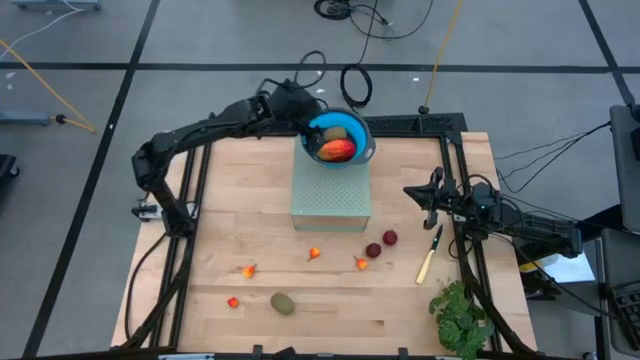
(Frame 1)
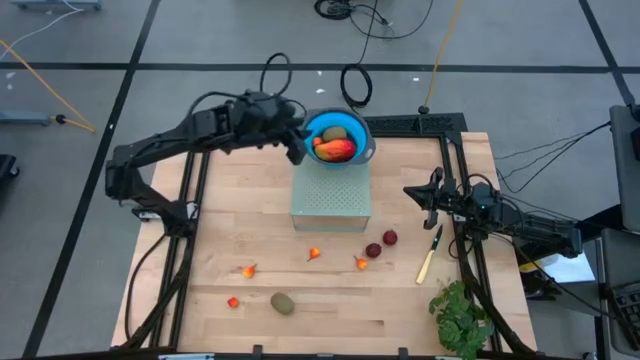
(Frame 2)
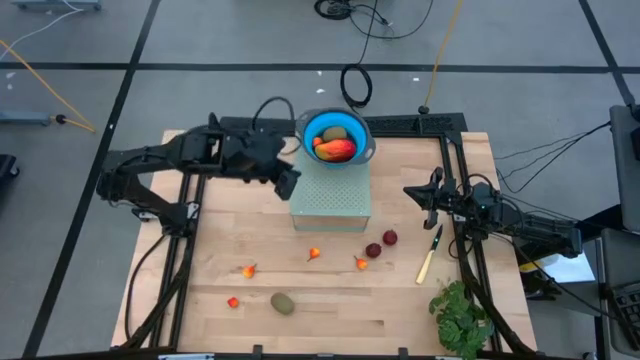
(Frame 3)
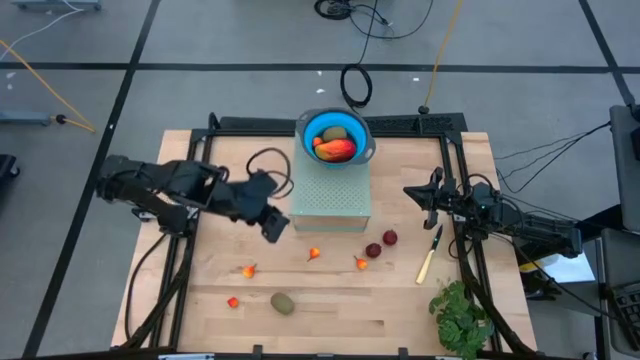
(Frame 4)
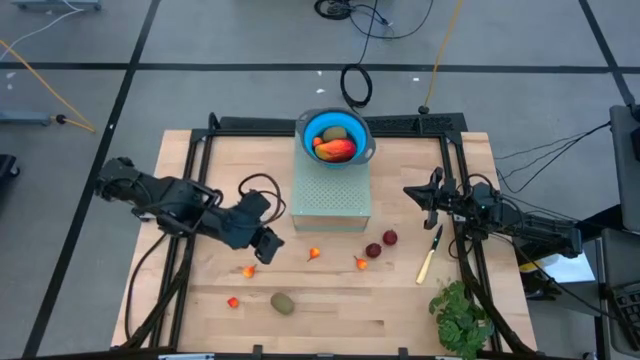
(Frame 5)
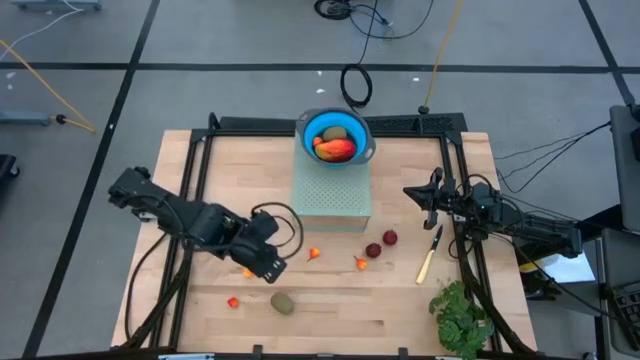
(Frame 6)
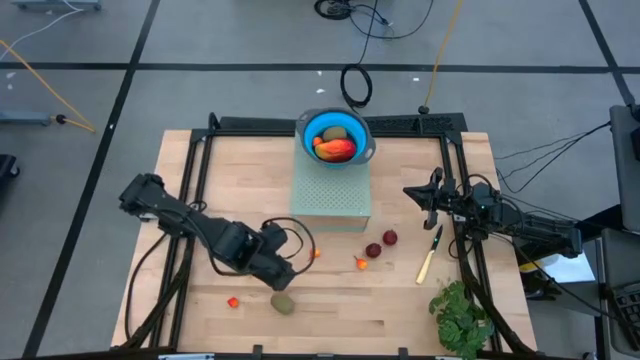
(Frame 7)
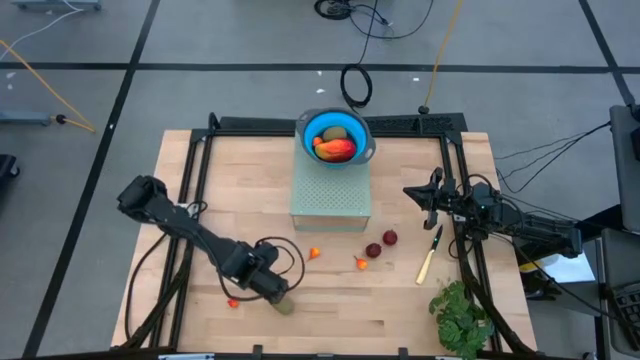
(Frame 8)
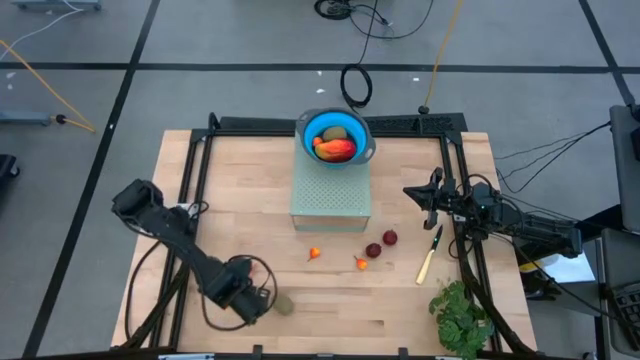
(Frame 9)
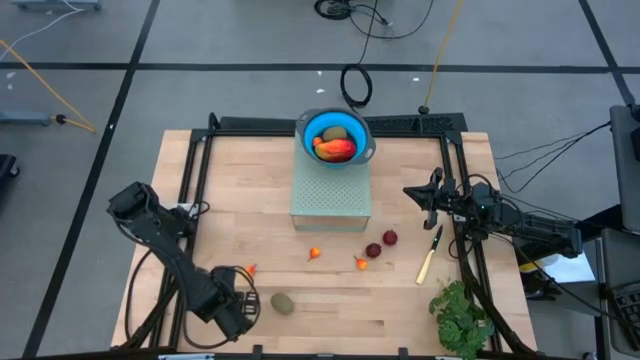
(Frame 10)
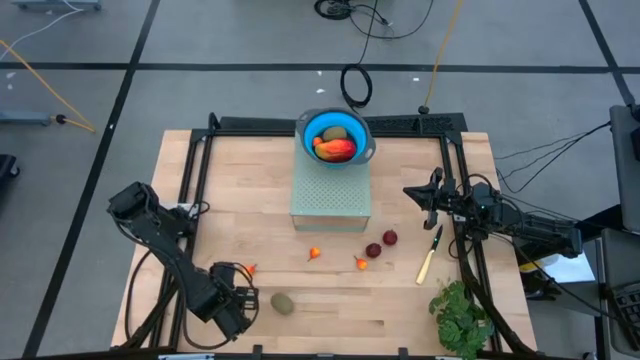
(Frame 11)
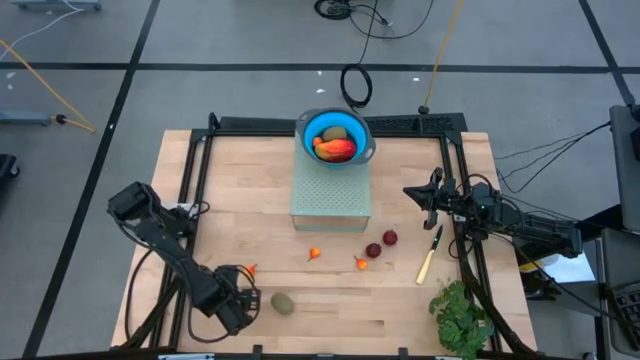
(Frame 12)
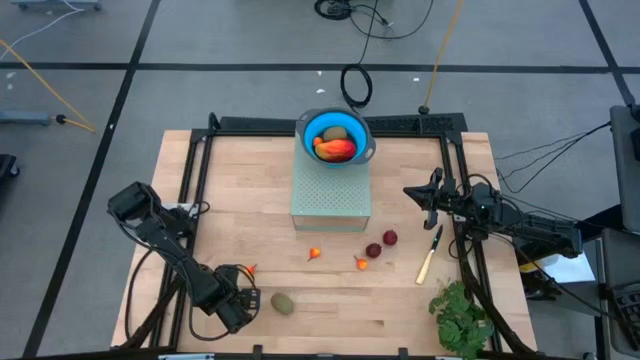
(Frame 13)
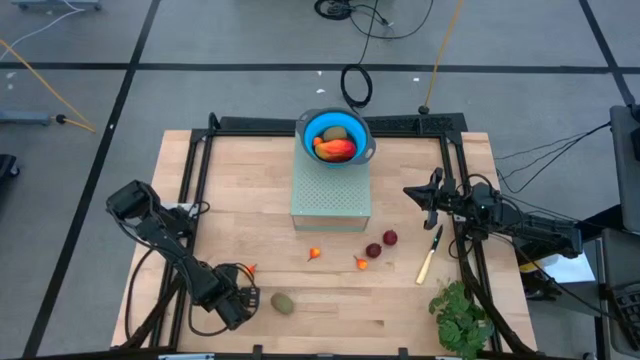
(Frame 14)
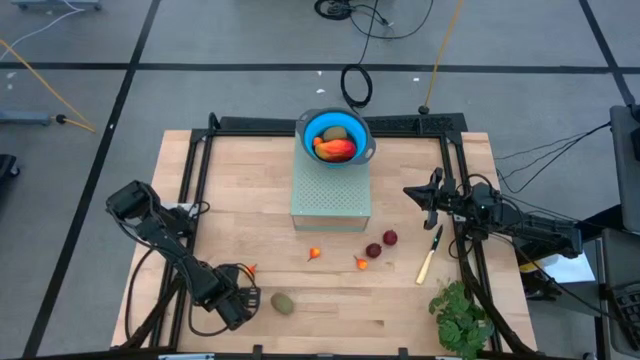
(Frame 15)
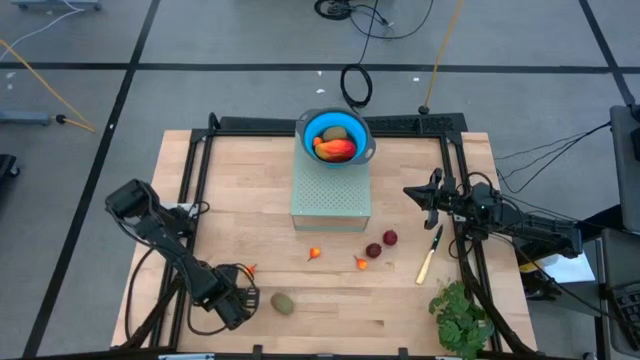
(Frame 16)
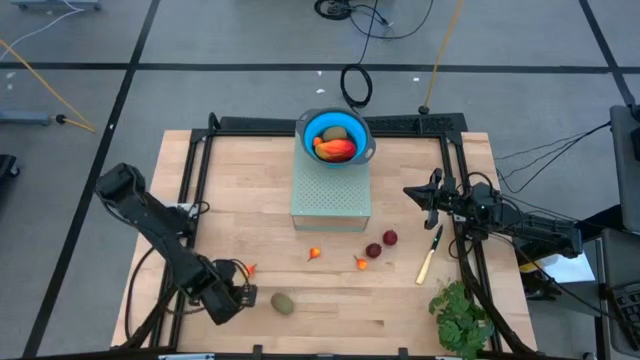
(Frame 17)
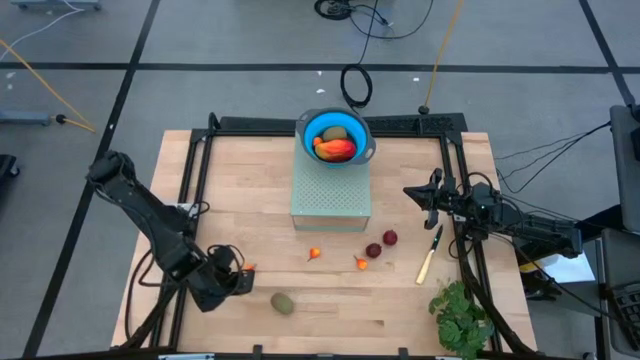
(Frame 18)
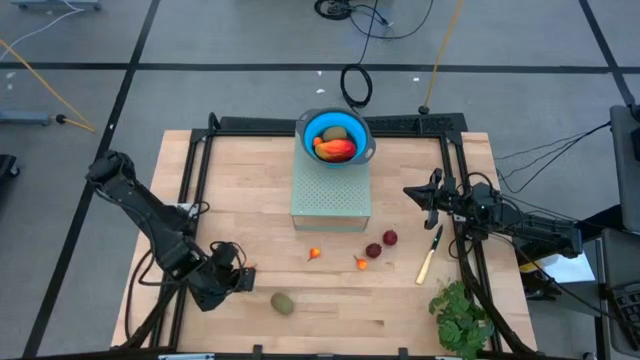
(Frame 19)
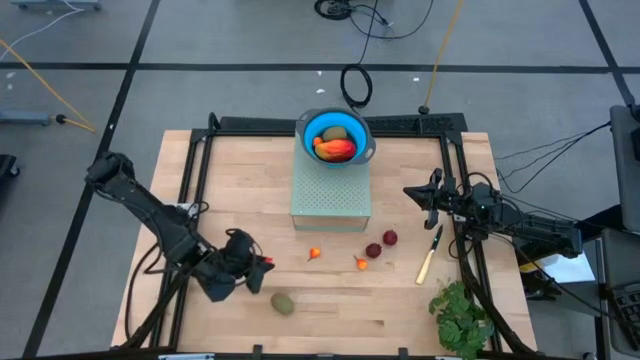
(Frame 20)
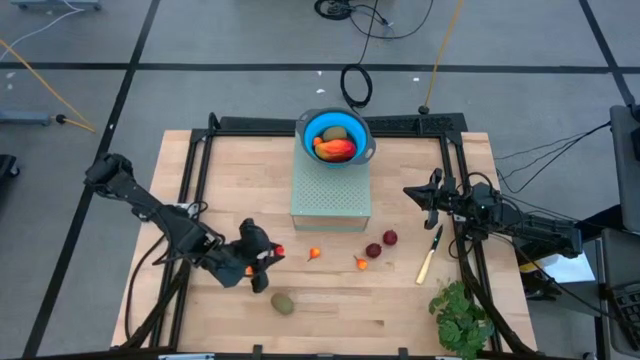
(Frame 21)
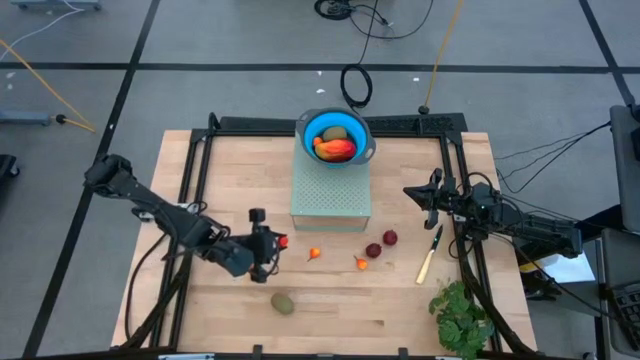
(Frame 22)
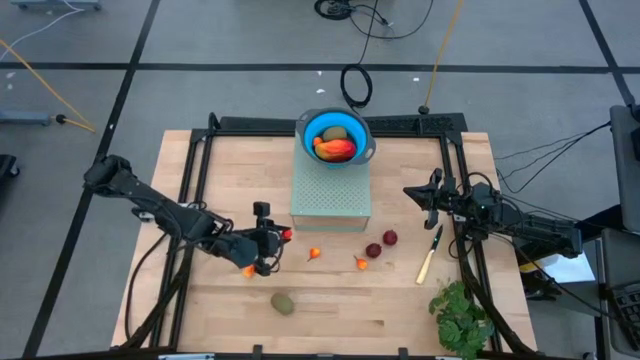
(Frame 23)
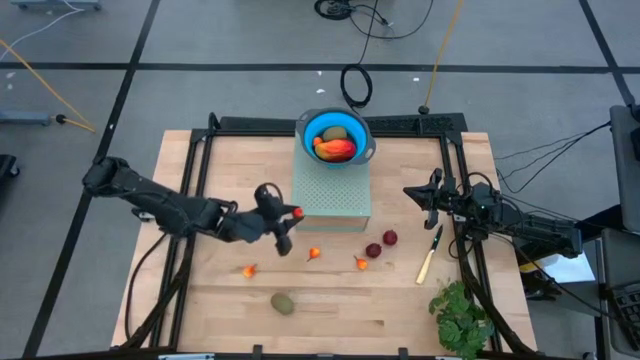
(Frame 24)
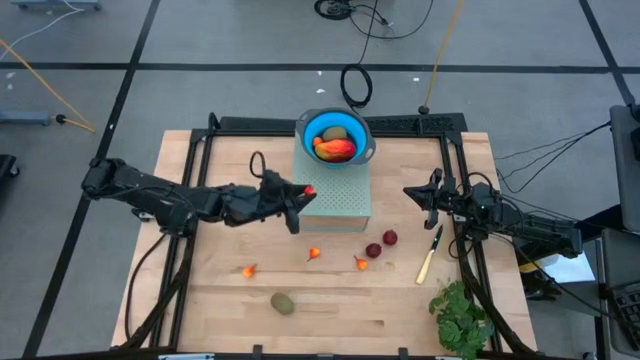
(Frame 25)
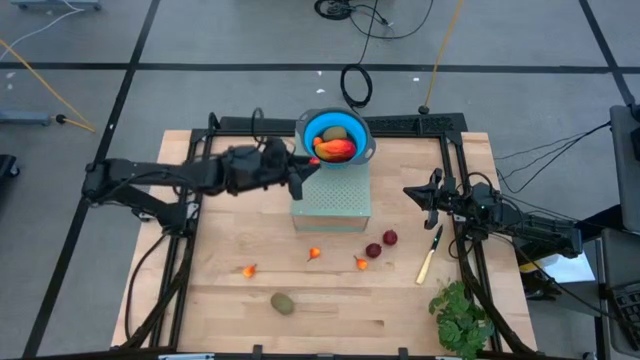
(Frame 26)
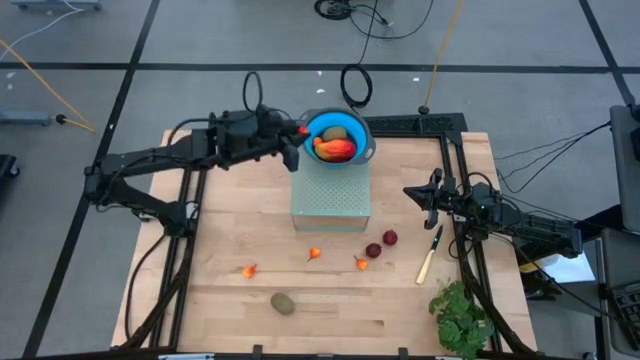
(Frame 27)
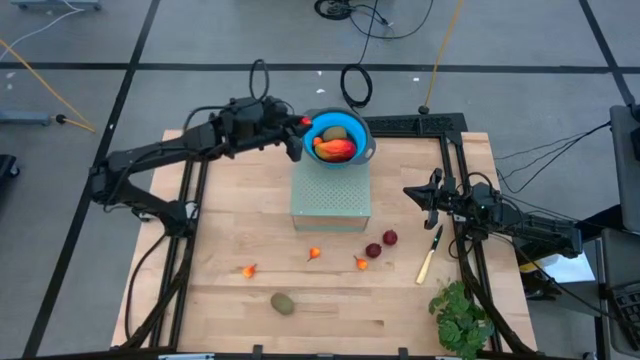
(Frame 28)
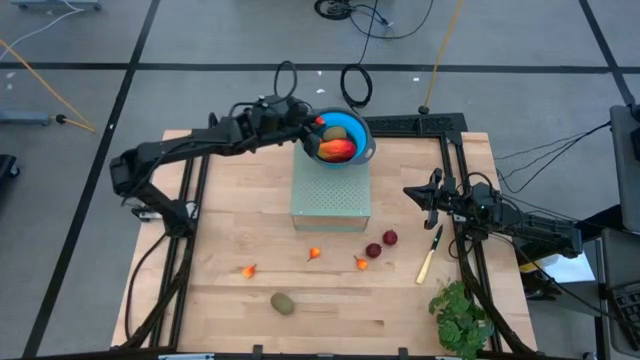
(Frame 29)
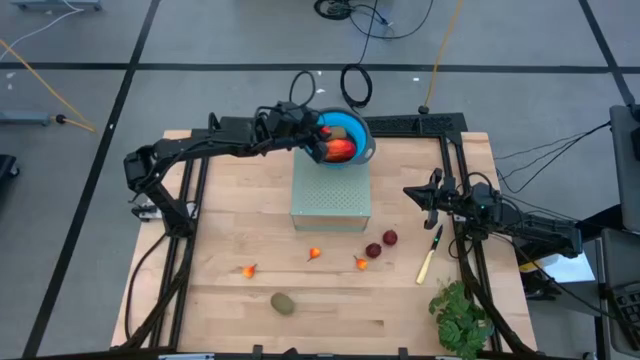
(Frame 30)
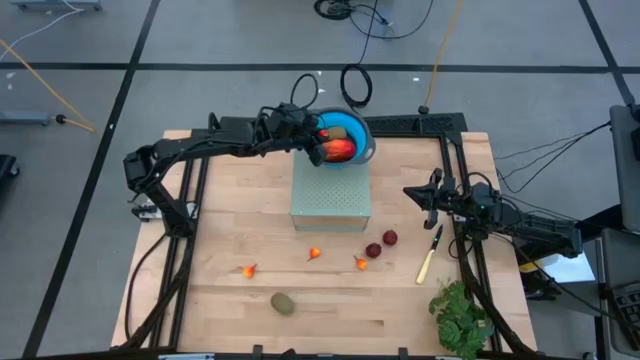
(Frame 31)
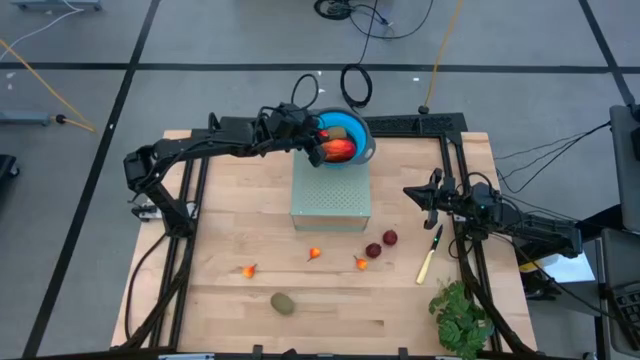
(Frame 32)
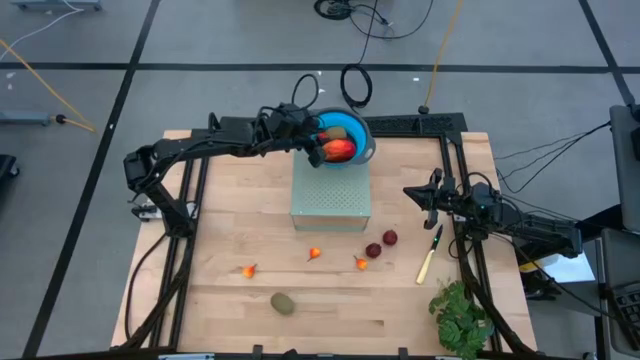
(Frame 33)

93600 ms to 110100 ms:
Task: Pick & Place Fruit
Put the pear into the blue strainer bowl on the shelf

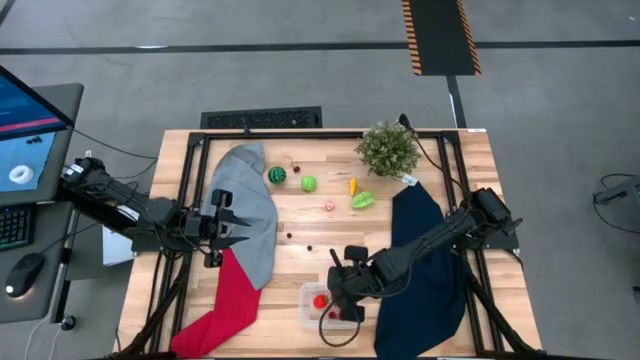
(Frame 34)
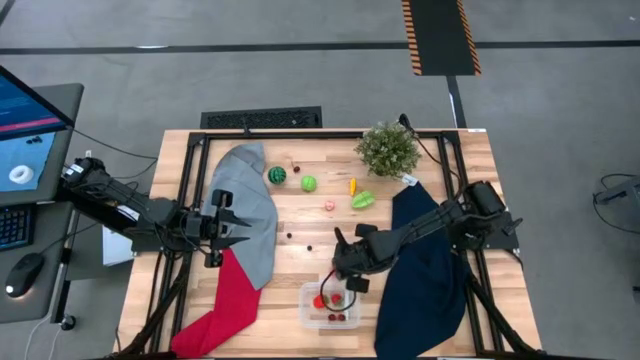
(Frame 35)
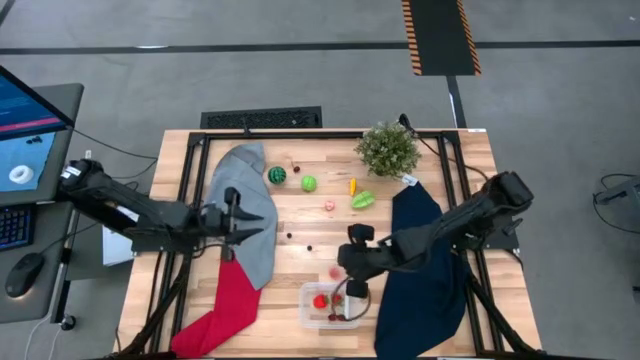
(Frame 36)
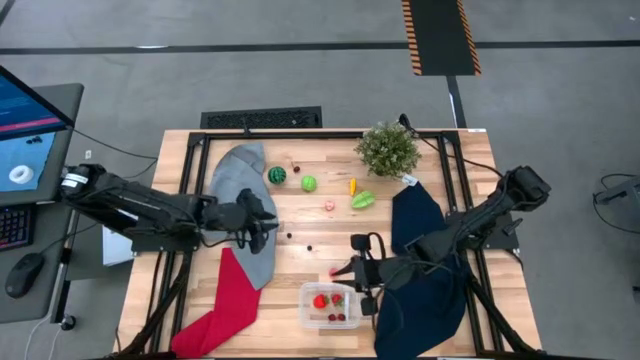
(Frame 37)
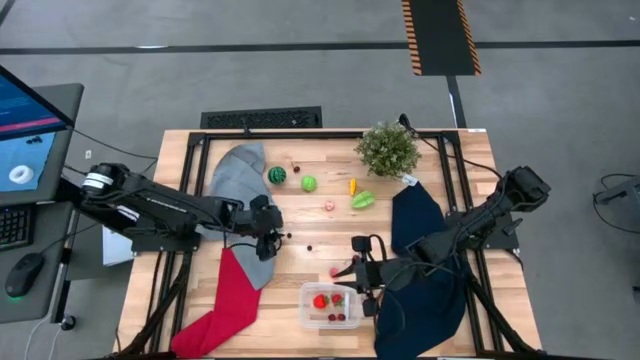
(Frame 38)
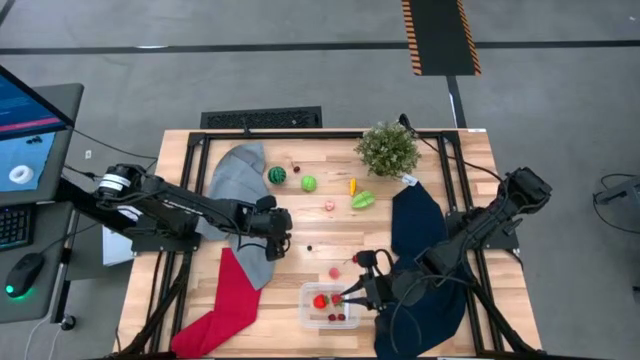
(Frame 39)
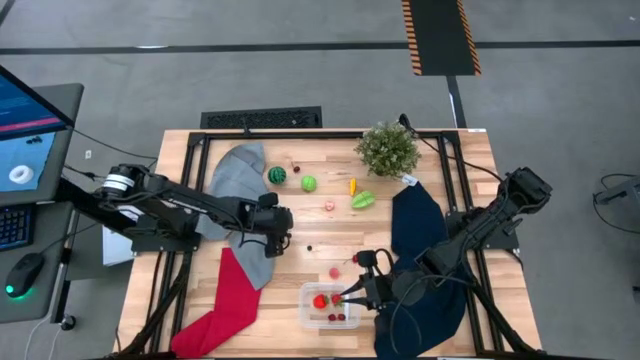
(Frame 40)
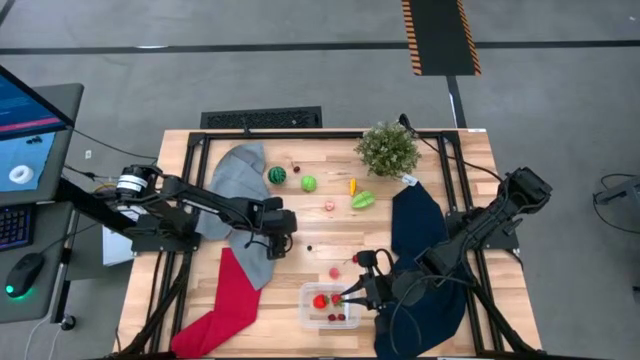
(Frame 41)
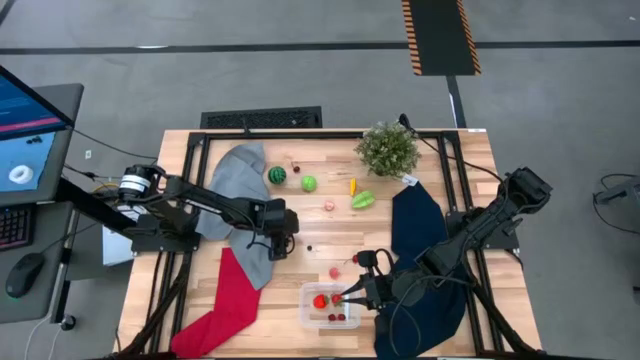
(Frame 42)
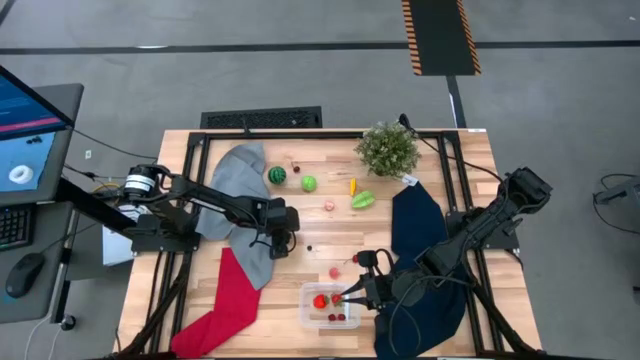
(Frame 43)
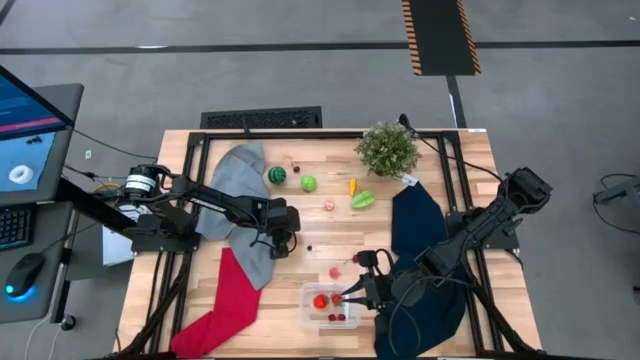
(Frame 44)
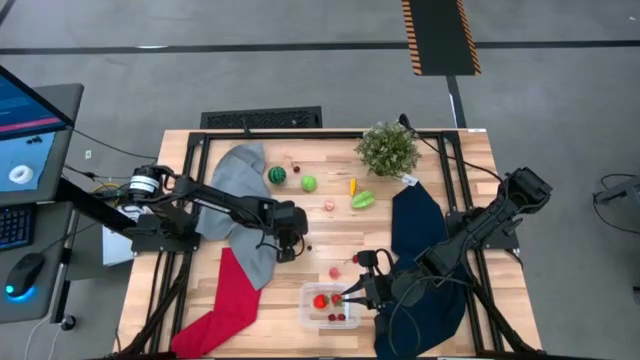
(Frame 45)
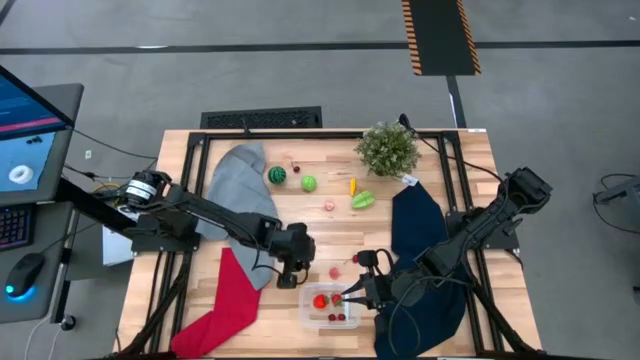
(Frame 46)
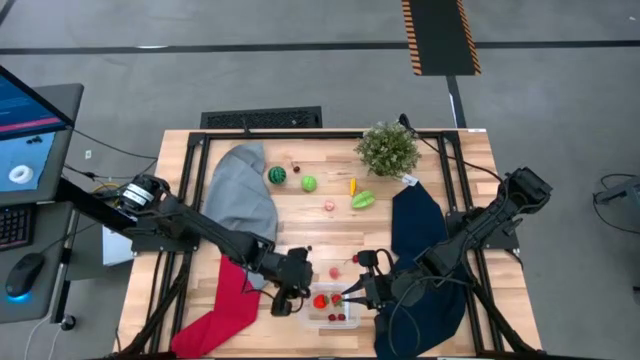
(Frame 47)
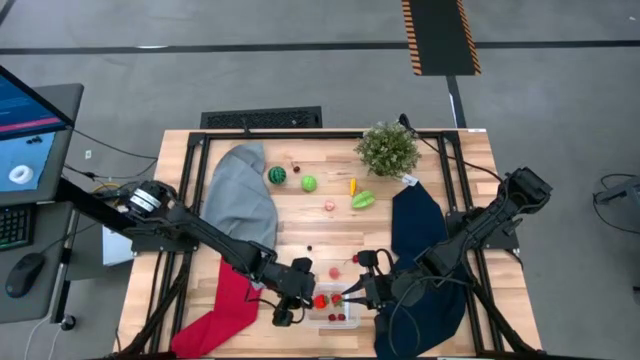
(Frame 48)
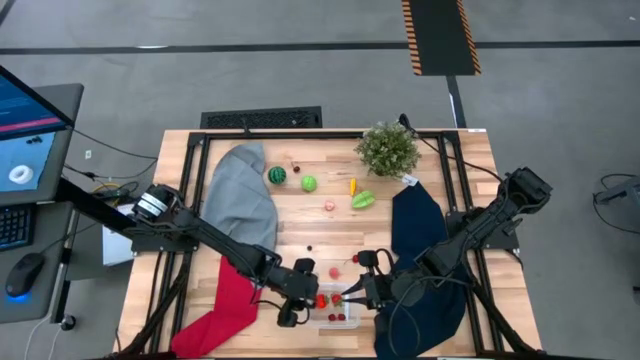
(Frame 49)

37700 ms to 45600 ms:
Task: Pick and placing Produce into tupperware
Put the blueberry into the transparent bin
